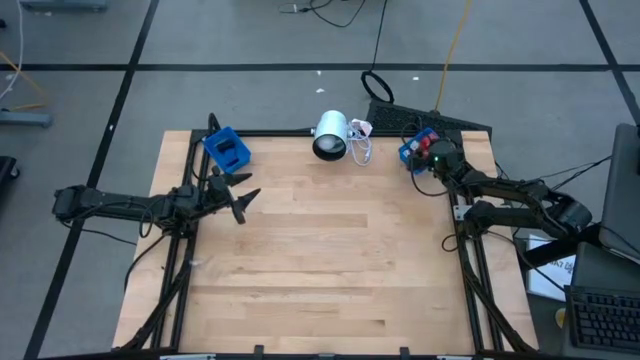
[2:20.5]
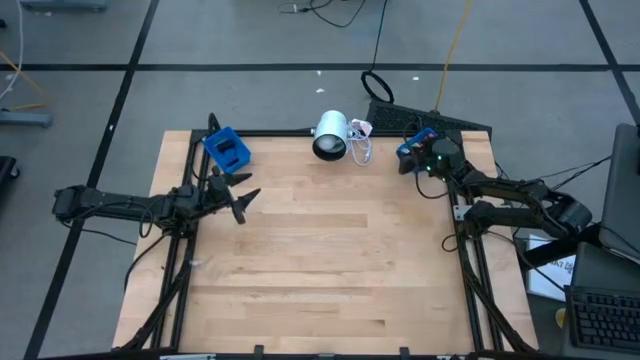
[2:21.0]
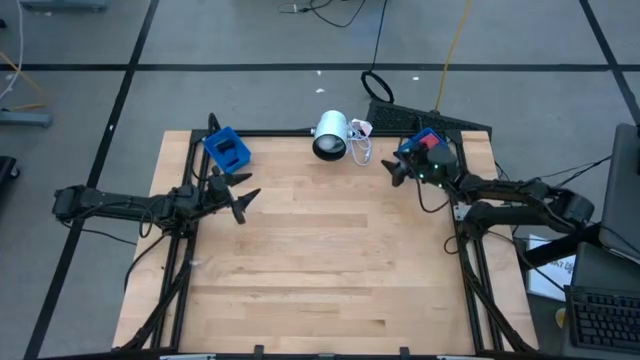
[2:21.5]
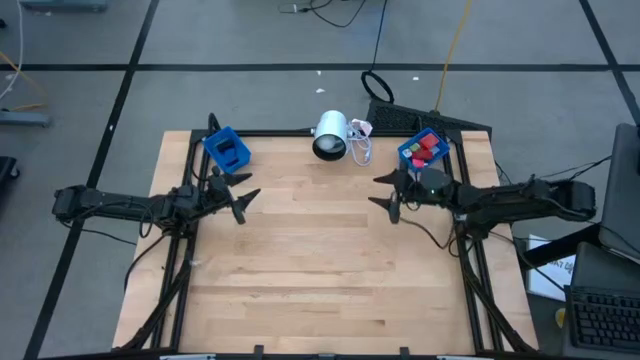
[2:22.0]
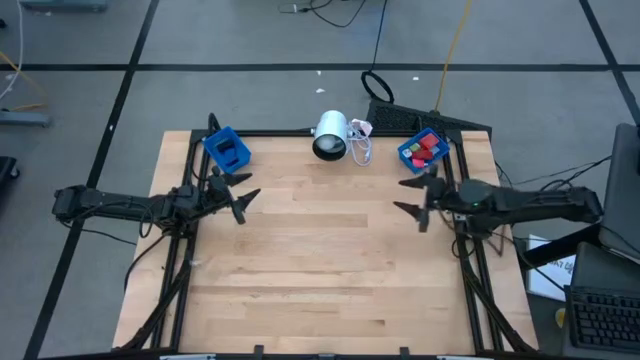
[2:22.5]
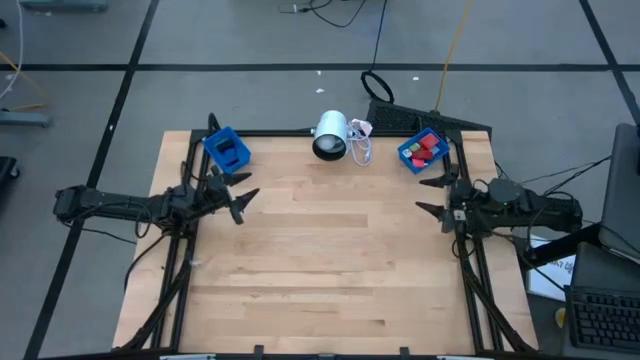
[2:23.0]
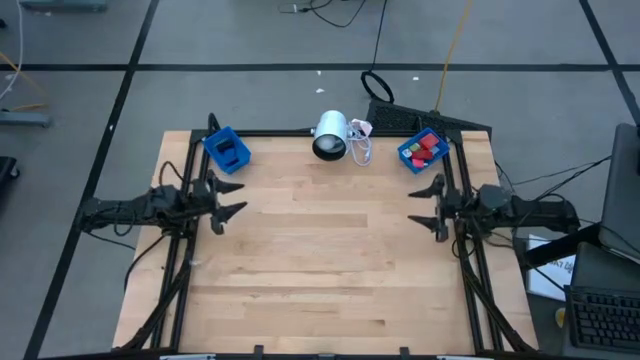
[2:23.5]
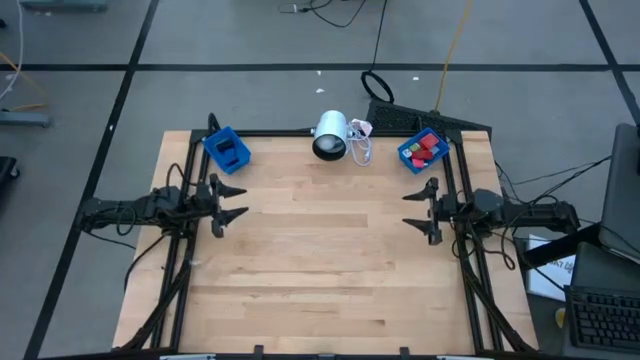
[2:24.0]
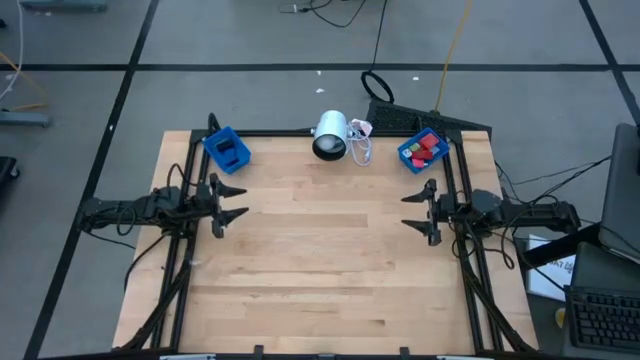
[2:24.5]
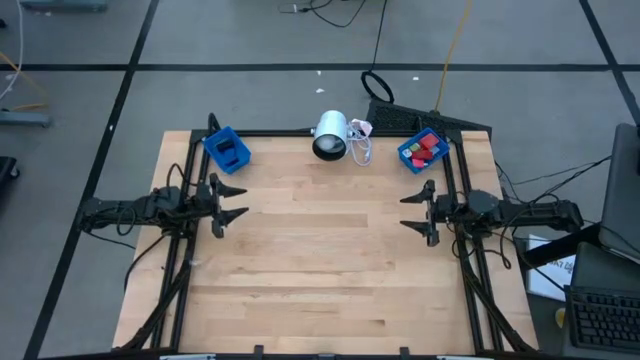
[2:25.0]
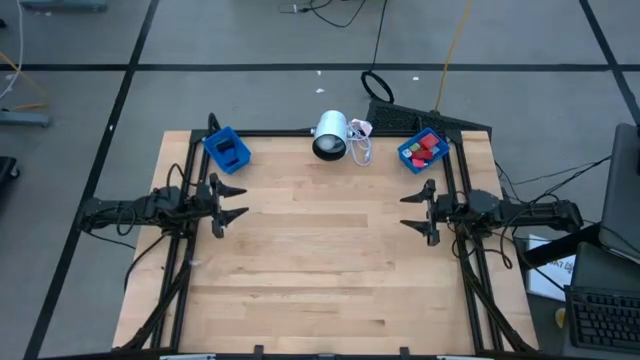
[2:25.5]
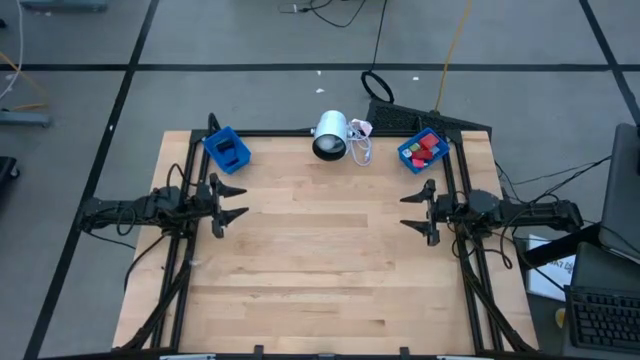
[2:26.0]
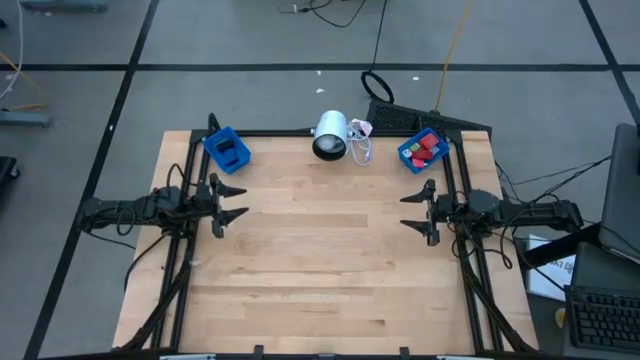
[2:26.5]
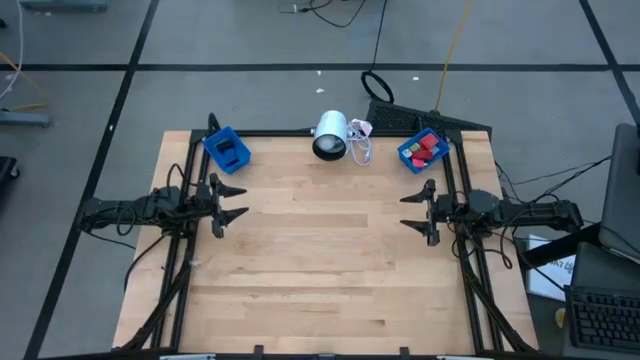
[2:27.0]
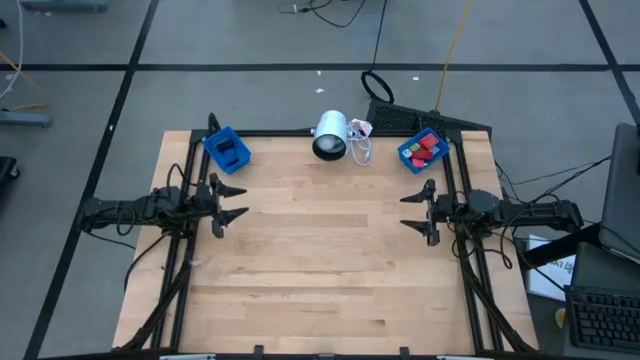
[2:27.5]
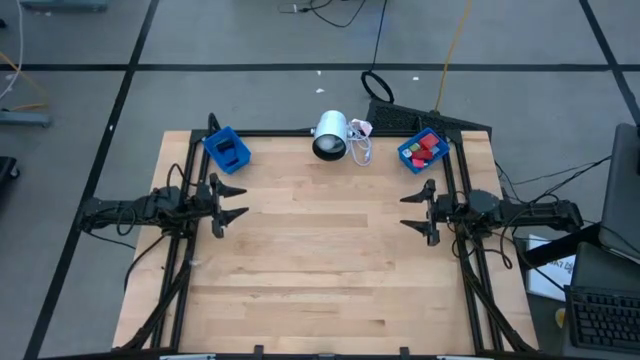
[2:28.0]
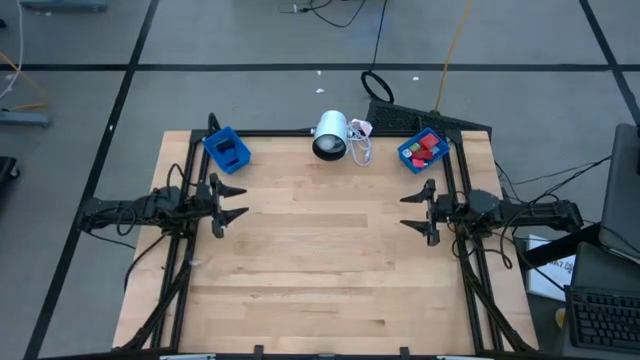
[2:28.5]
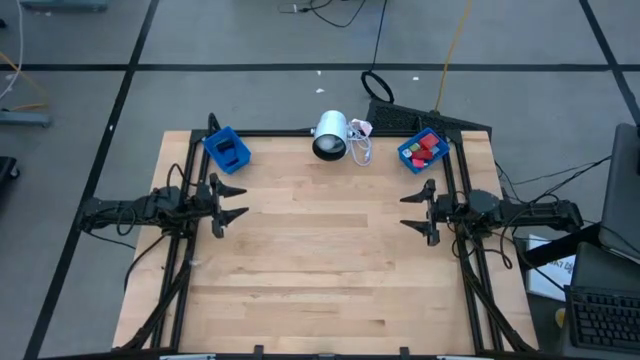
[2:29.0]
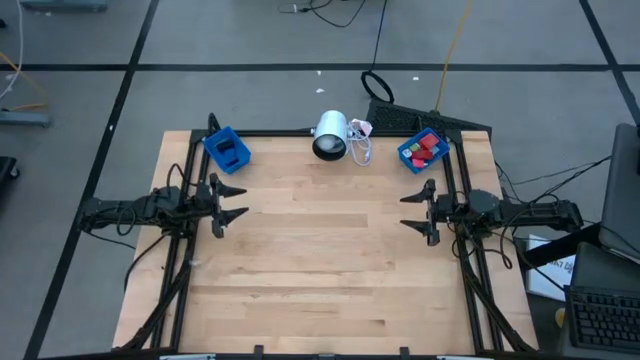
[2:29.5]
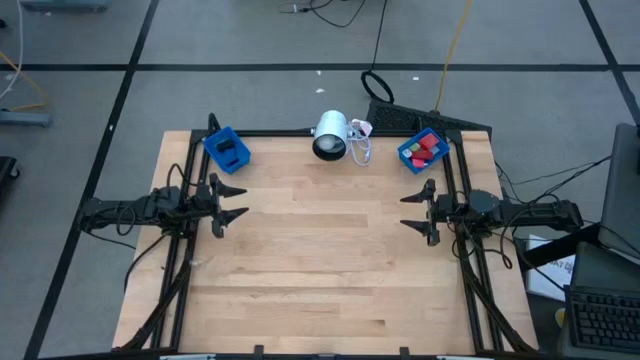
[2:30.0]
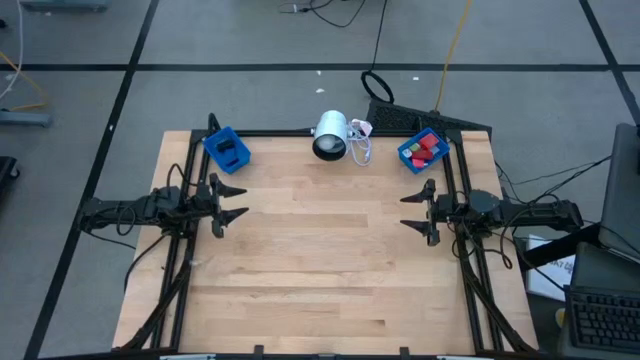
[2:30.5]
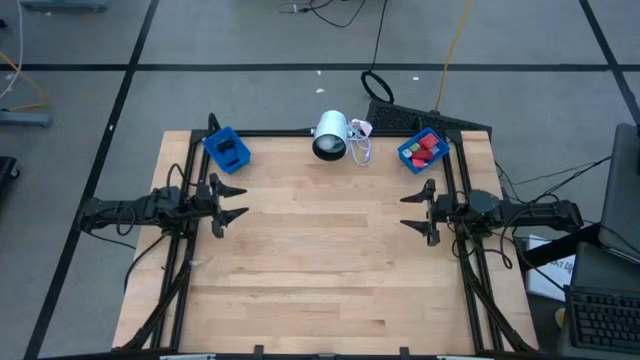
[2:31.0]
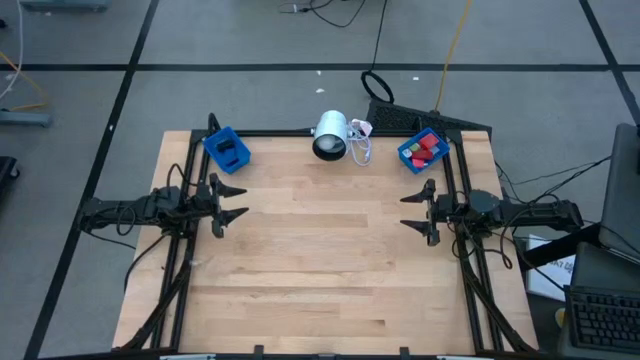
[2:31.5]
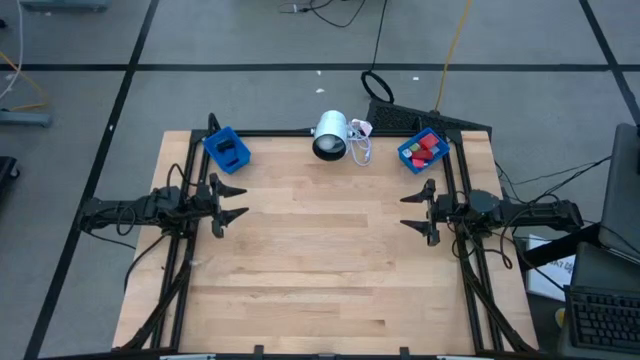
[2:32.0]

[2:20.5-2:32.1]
Task: Pick & Place Office items
Return to Home Position

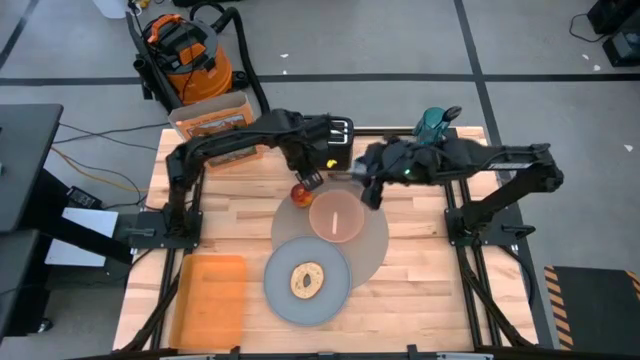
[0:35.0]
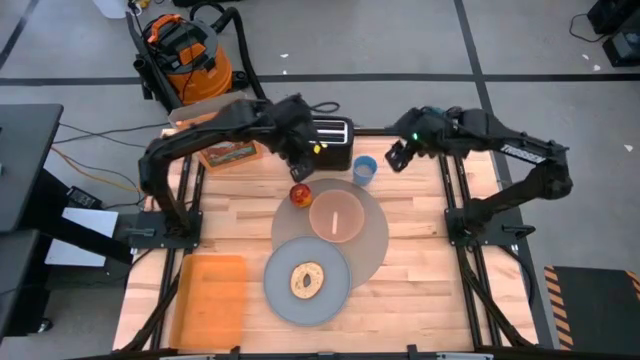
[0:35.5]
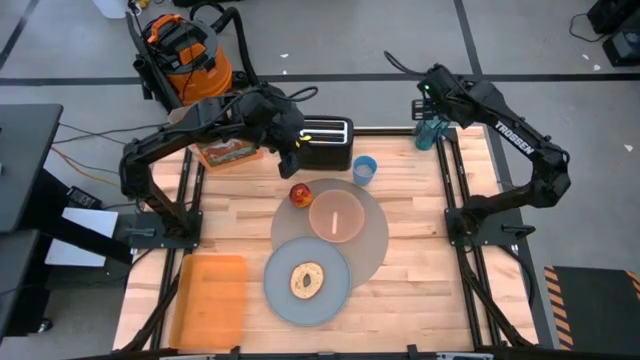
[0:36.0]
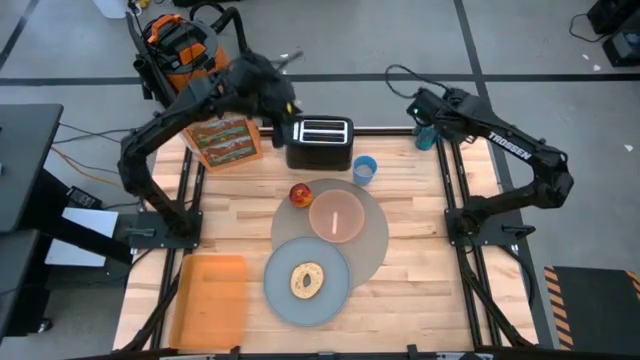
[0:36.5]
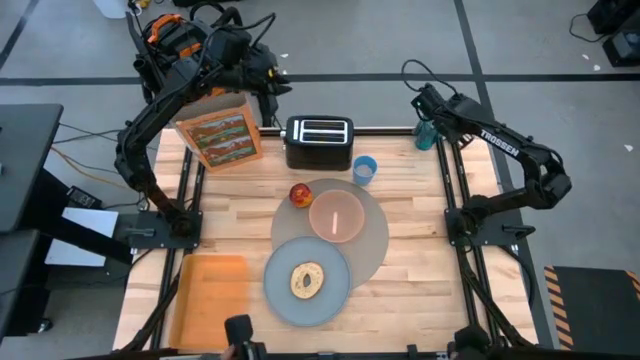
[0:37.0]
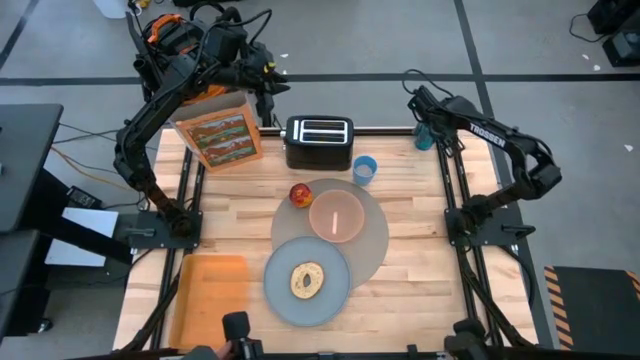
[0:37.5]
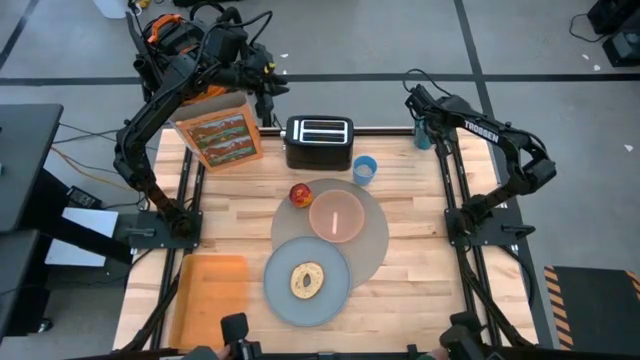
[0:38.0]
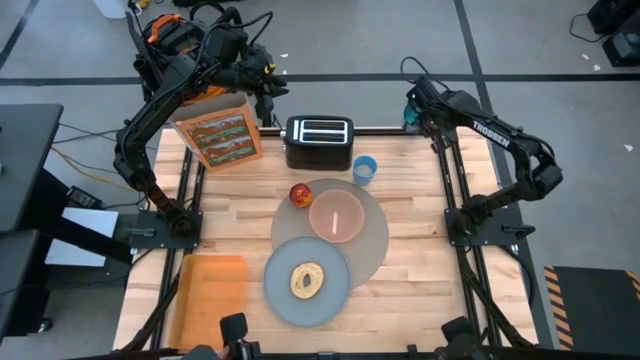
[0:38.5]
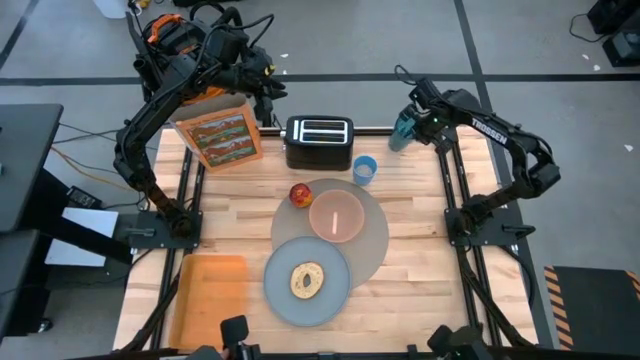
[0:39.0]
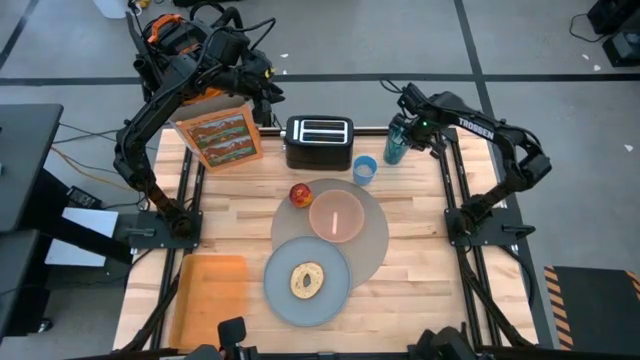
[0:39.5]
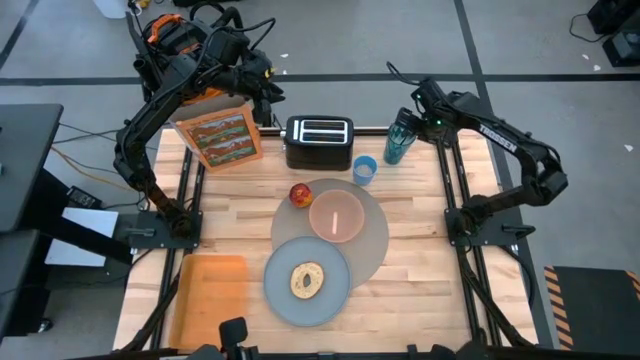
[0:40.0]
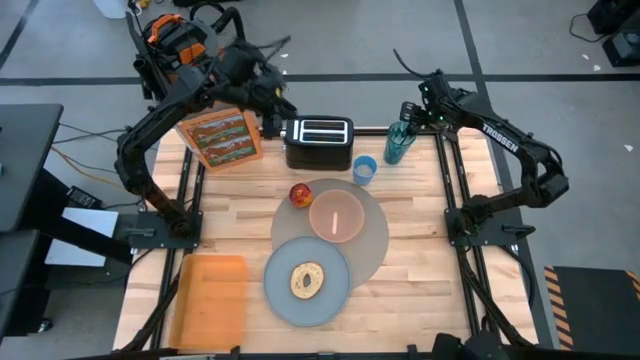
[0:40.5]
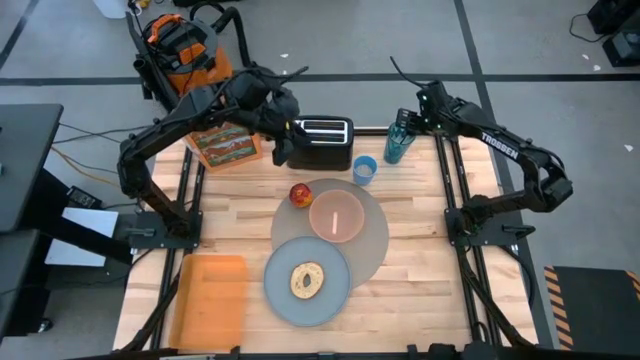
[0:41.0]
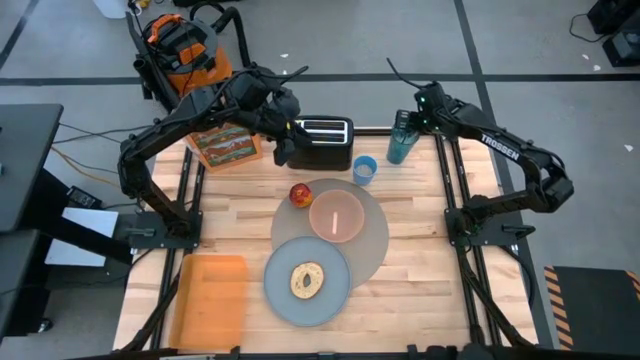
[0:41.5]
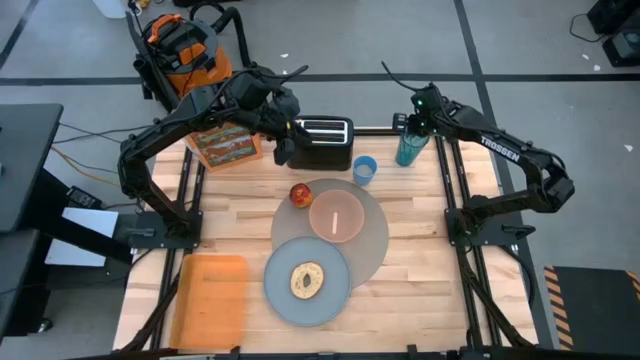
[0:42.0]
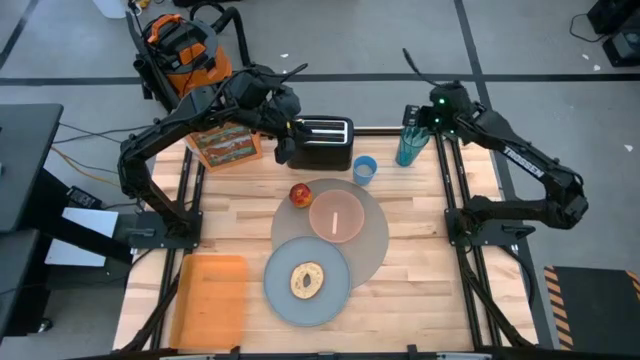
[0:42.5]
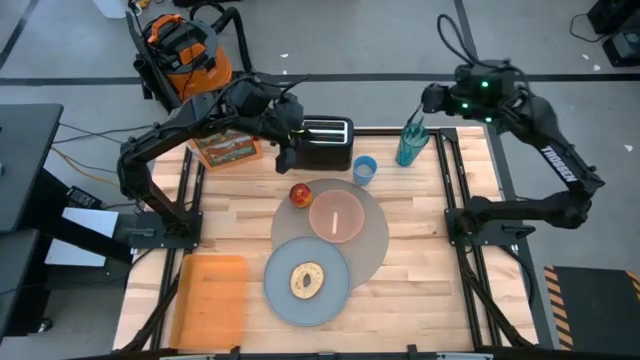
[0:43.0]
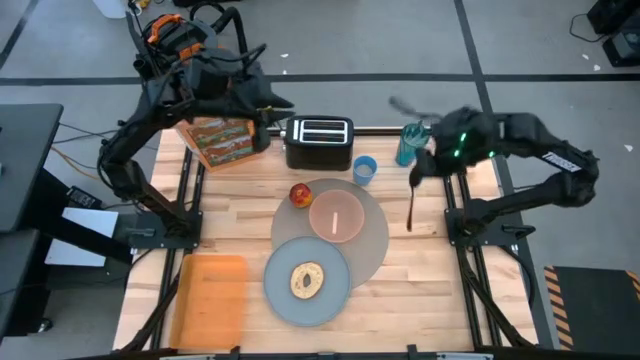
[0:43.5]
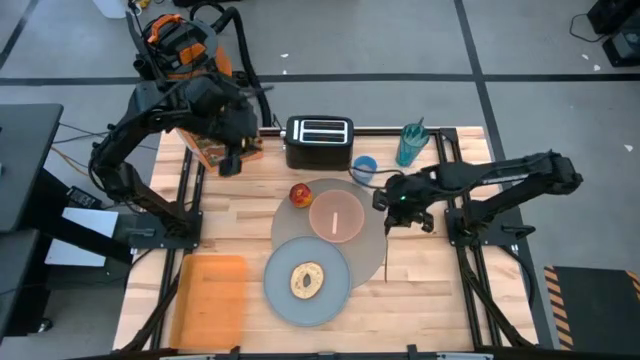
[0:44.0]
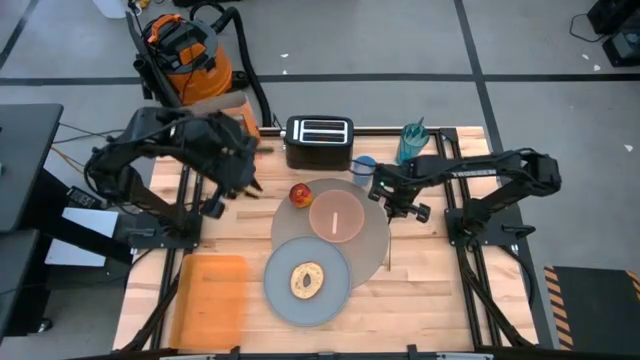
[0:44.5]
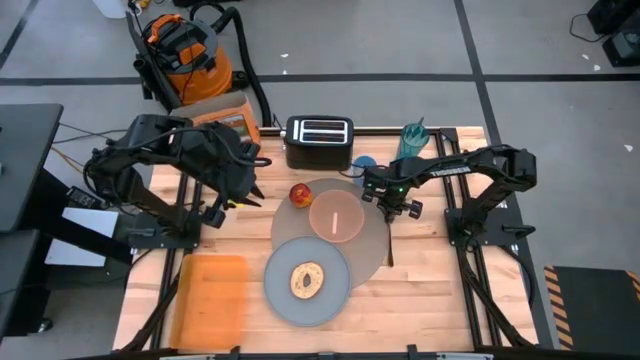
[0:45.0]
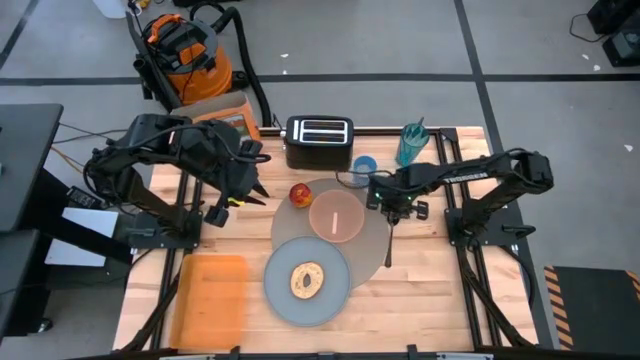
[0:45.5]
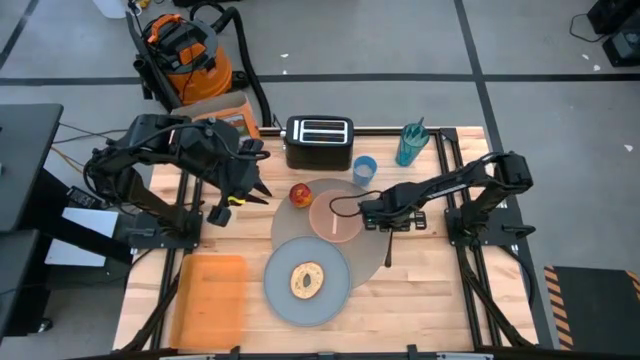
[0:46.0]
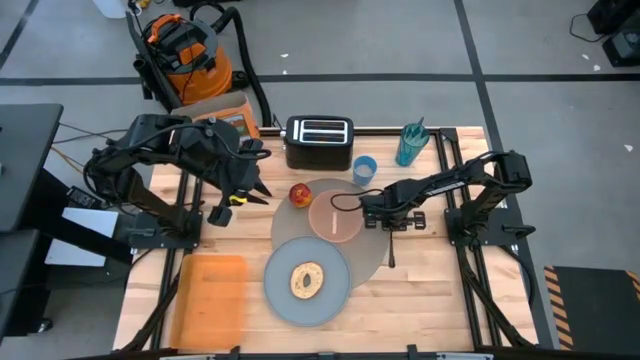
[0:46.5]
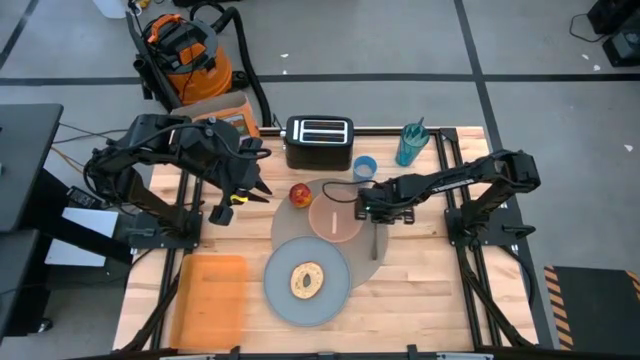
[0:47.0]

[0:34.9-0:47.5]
Task: Arrange a breakfast setting
Put the black spoon on the right side of the light orange bowl on the gray placemat
